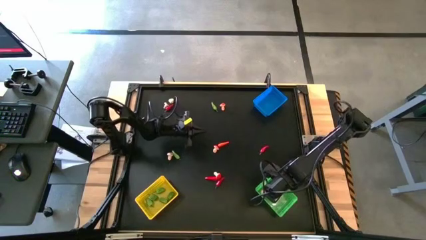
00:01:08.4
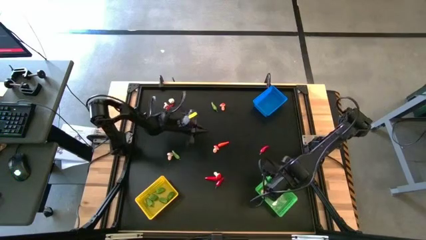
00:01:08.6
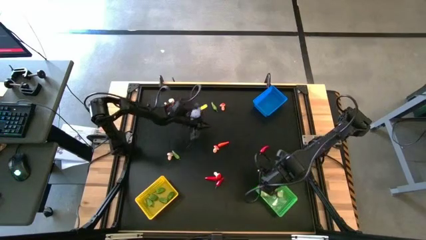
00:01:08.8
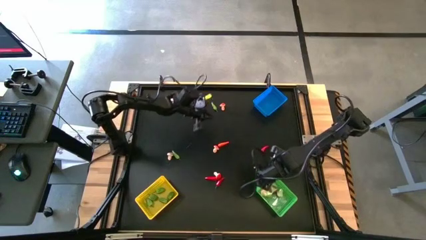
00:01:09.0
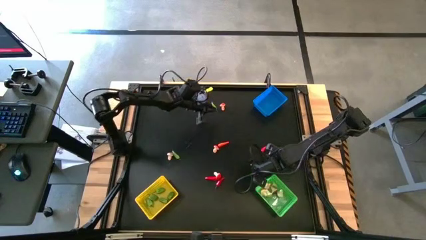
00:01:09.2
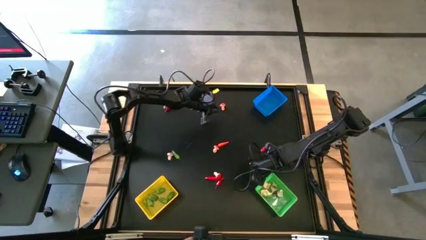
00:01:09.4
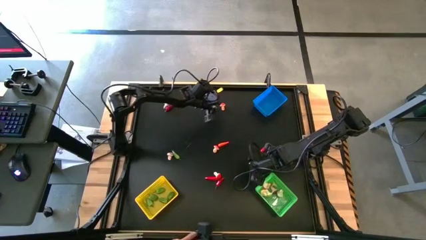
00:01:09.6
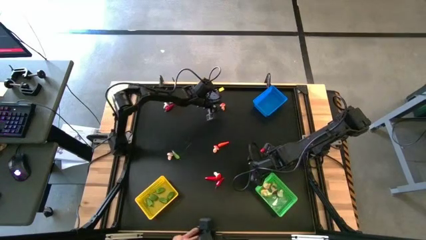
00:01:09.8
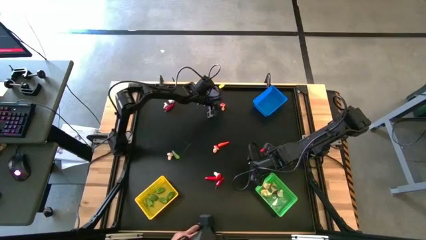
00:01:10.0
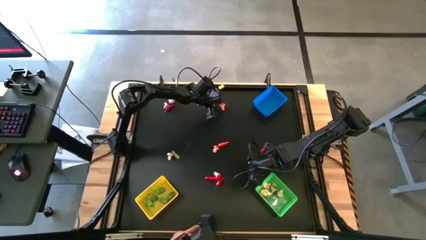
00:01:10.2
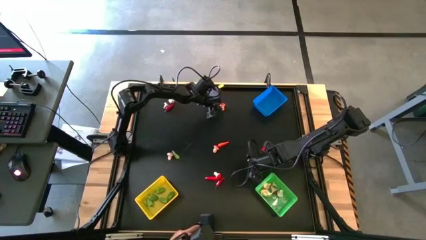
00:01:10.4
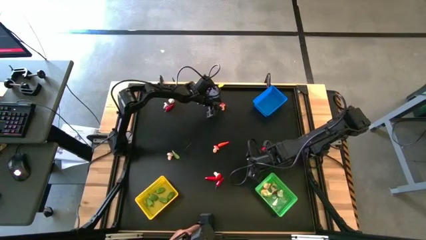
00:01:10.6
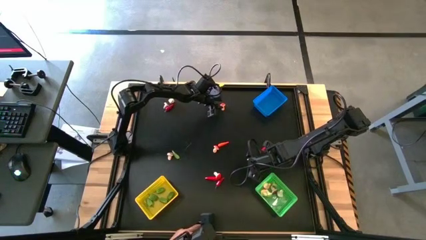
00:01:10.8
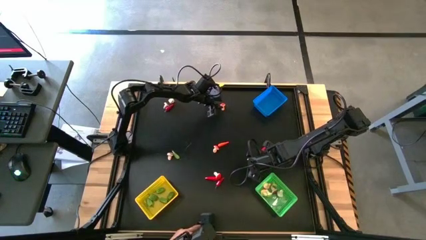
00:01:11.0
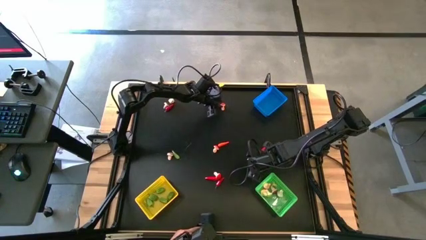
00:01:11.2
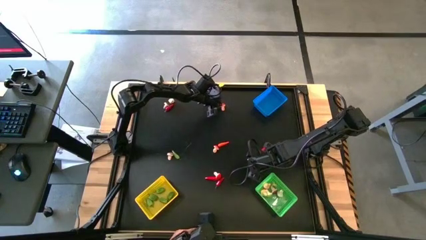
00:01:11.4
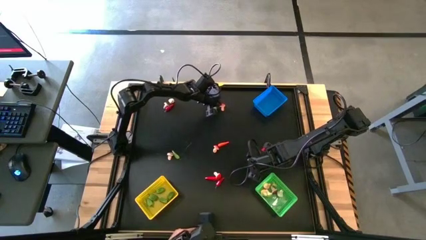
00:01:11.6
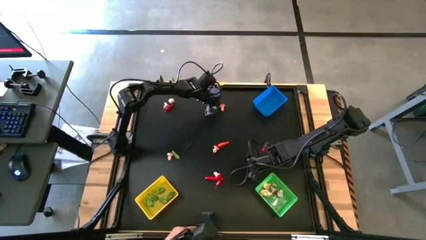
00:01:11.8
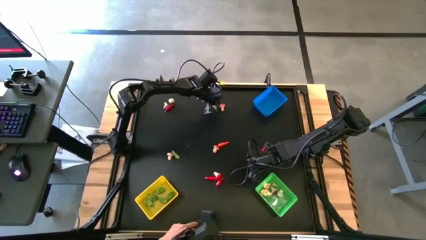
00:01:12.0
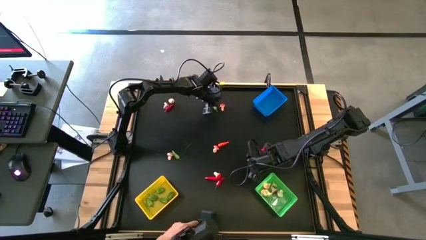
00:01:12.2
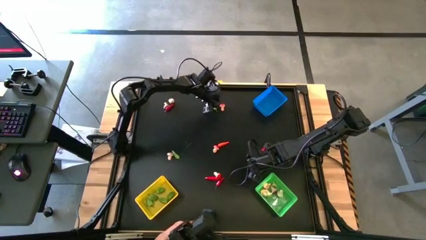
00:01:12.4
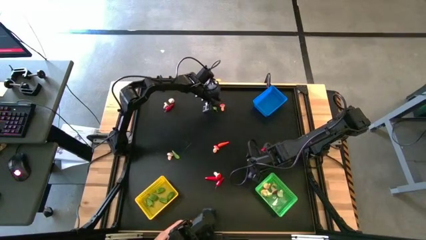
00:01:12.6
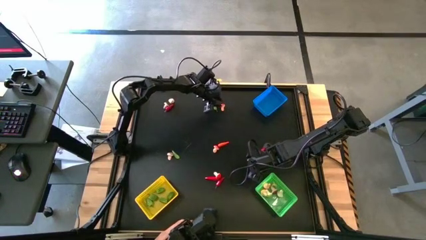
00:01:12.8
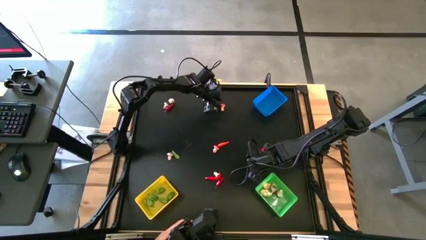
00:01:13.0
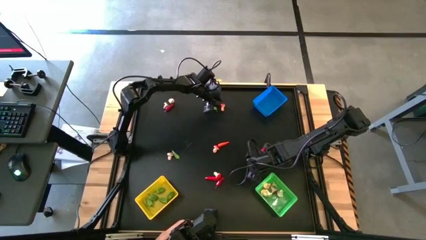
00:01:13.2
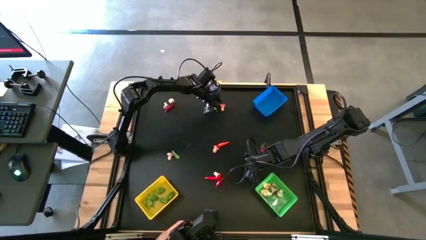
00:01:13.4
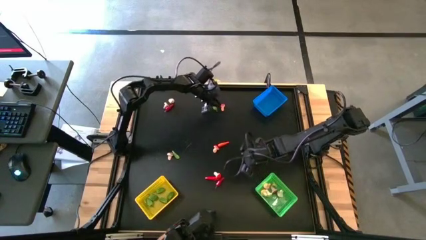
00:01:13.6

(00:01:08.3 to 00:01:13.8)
Task: Sort produce into baskets
Put the red mushroom into the green bin

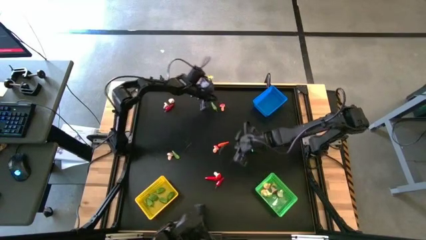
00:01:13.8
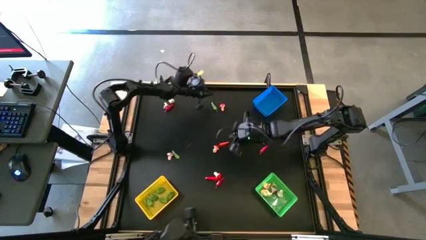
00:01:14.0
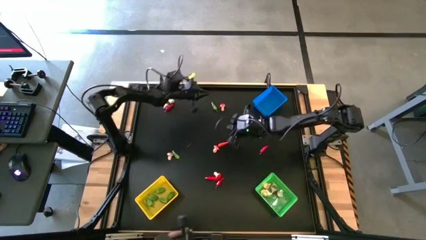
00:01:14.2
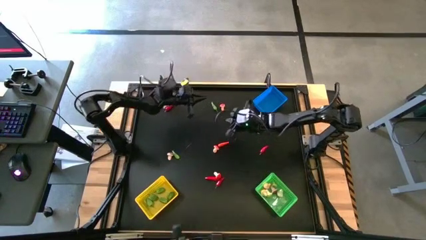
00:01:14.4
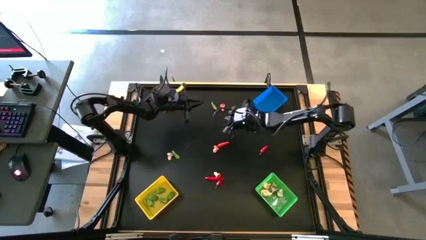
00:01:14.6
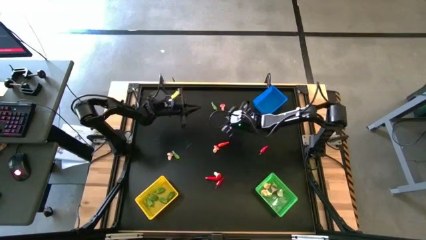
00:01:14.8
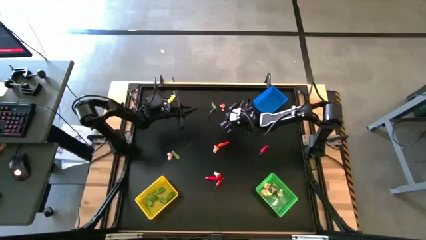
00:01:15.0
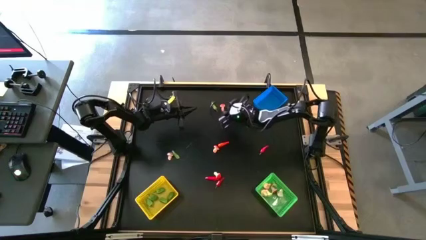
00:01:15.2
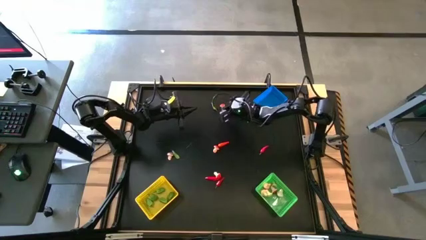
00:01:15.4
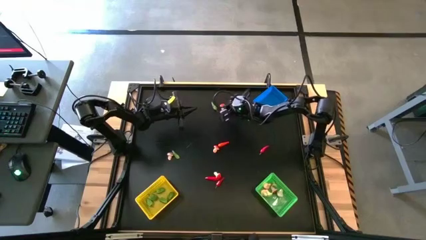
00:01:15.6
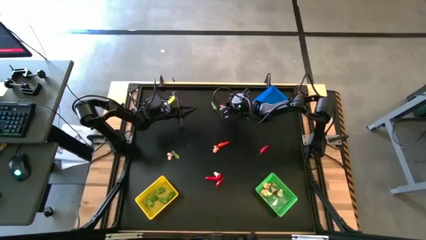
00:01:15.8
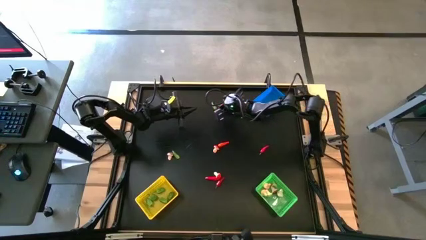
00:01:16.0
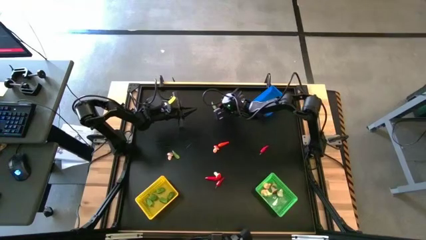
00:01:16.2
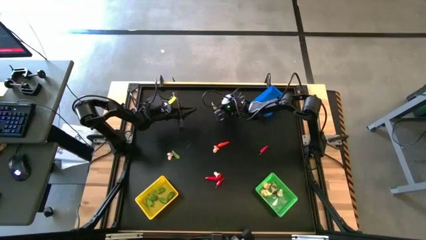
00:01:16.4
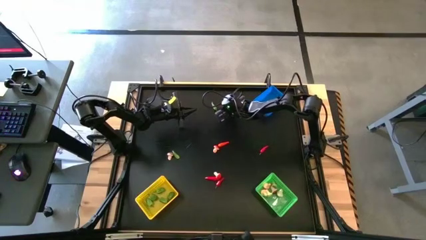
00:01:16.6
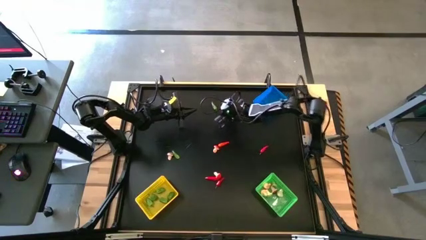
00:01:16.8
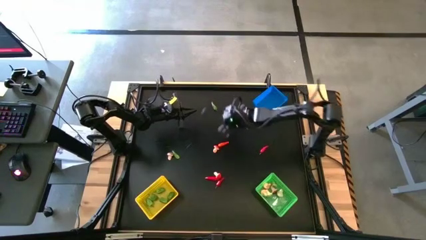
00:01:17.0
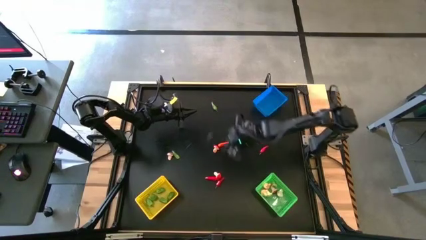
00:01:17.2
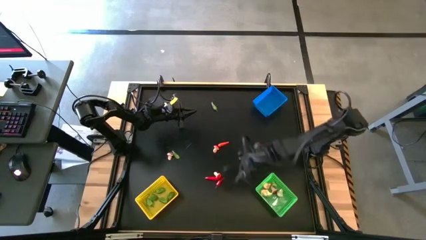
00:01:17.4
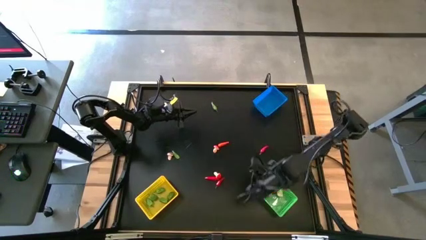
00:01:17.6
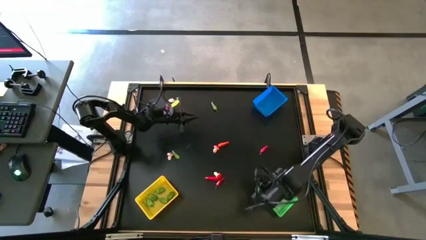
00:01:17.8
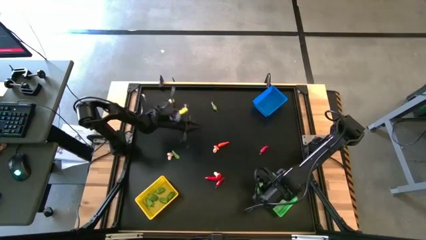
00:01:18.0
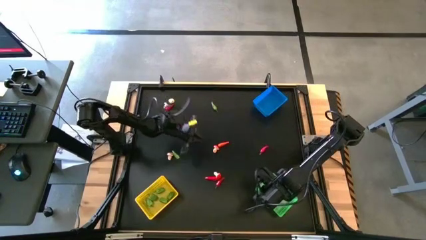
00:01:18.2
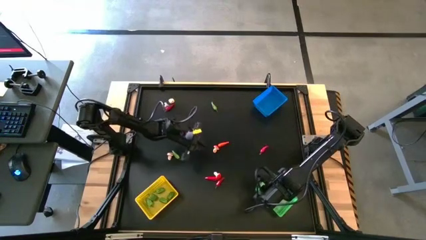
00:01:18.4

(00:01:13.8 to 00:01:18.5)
Put the red mushroom into the green bin

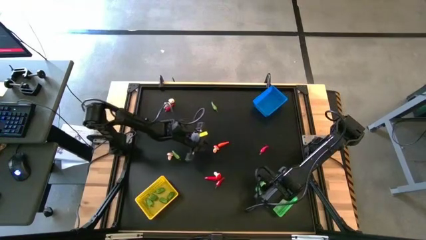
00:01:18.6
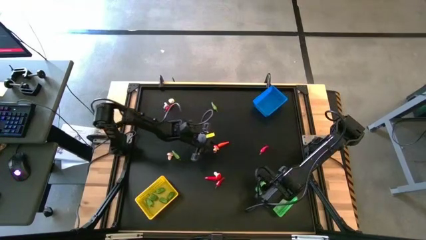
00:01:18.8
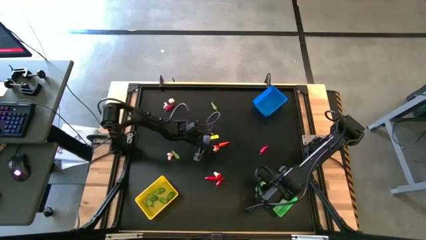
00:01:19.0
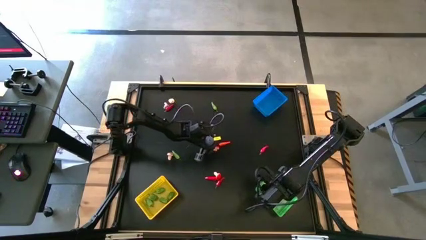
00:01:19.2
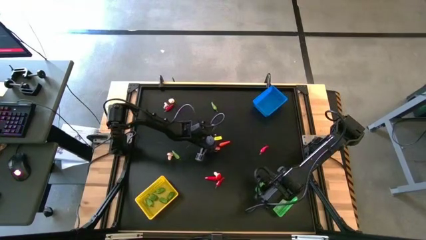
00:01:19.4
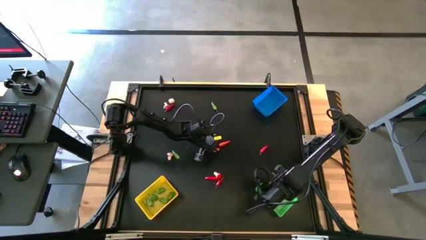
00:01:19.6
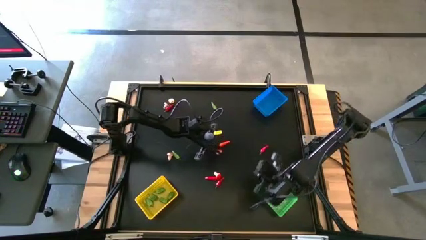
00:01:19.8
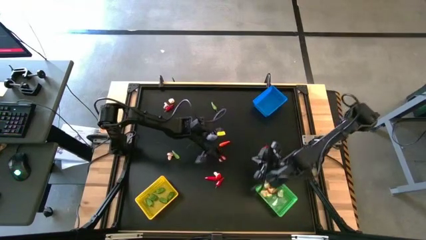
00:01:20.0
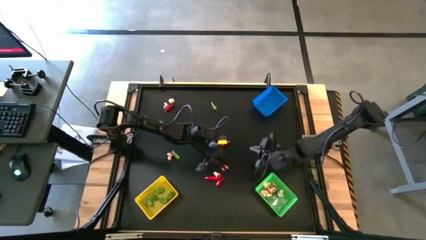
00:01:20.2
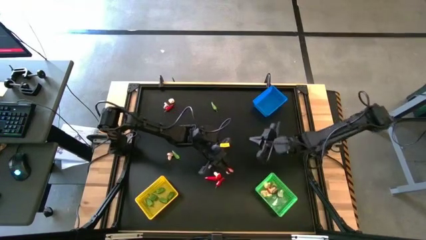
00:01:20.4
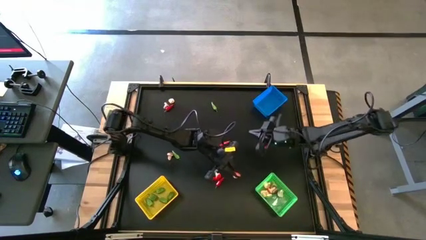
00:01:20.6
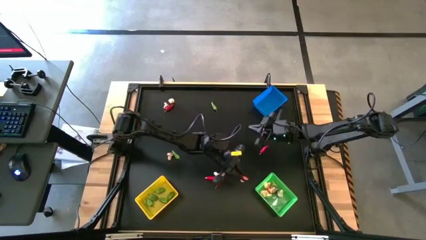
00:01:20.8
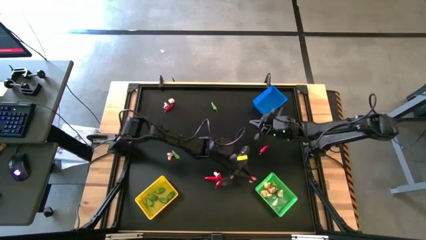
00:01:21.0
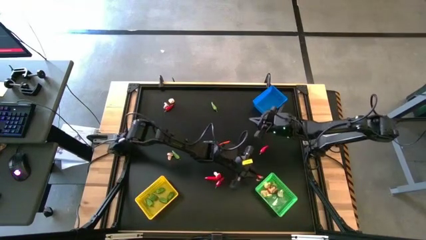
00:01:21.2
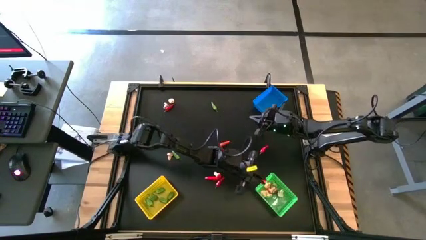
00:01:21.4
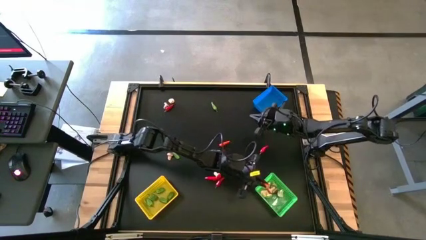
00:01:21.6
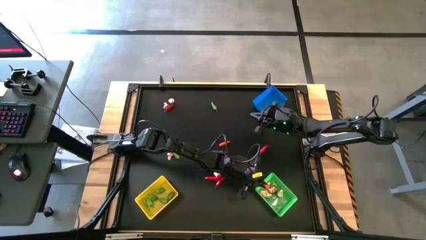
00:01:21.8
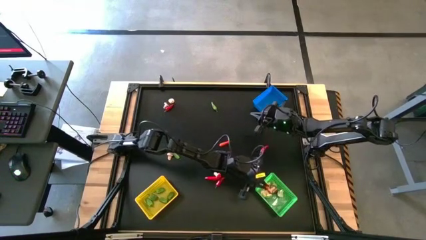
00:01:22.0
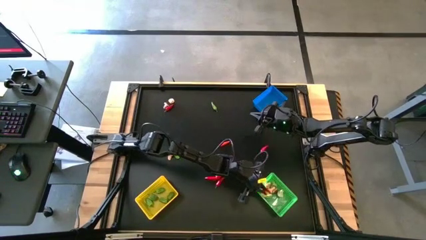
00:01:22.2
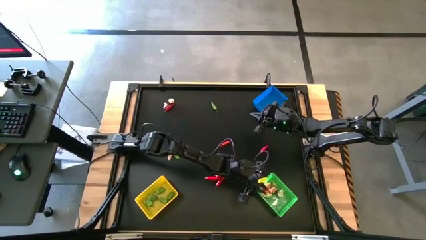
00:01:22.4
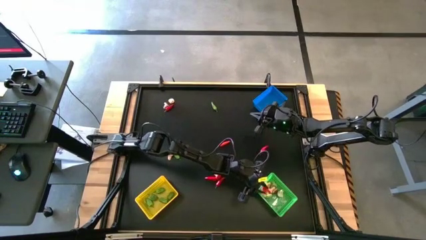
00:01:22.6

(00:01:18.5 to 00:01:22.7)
Put the red mushroom into the green bin

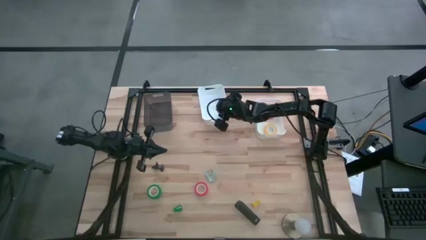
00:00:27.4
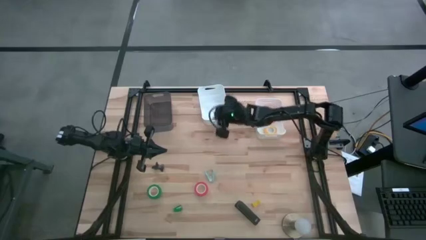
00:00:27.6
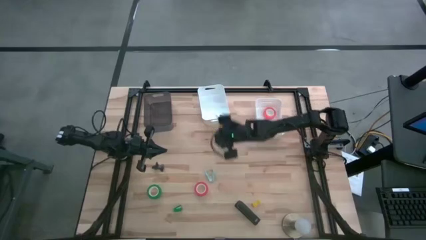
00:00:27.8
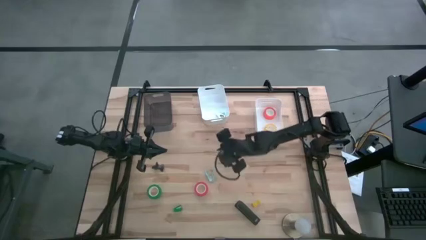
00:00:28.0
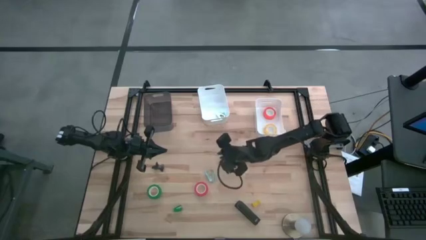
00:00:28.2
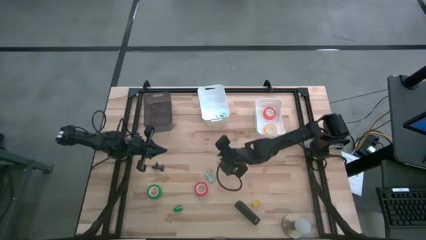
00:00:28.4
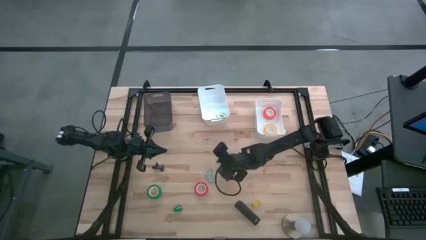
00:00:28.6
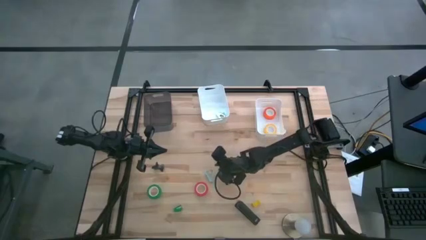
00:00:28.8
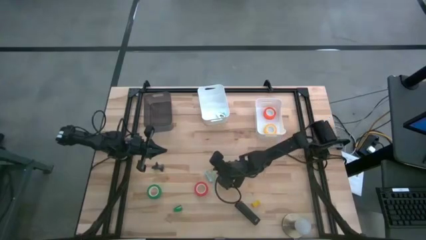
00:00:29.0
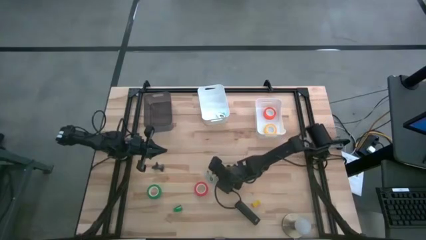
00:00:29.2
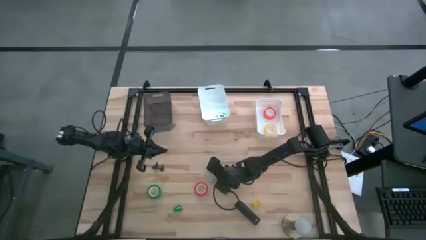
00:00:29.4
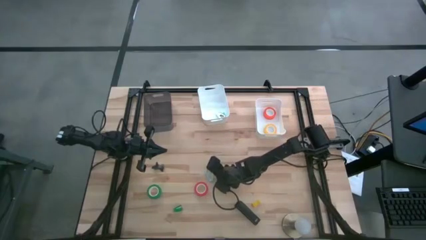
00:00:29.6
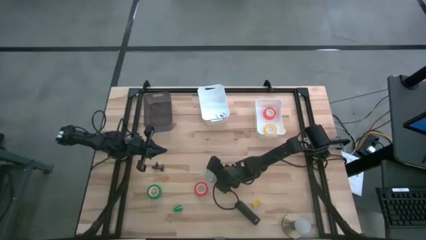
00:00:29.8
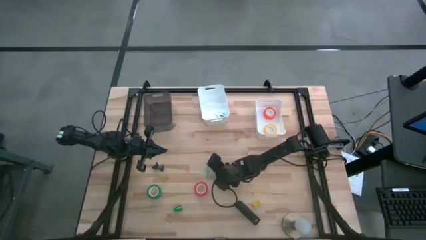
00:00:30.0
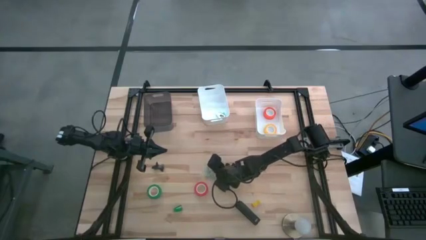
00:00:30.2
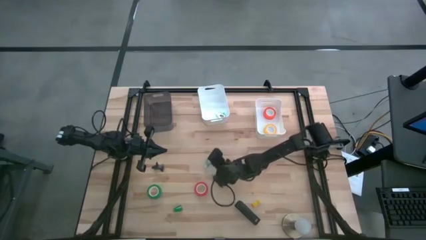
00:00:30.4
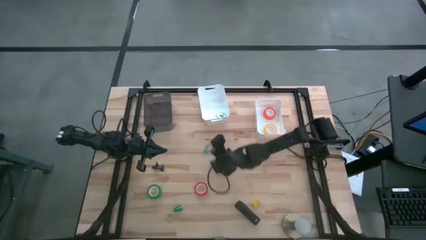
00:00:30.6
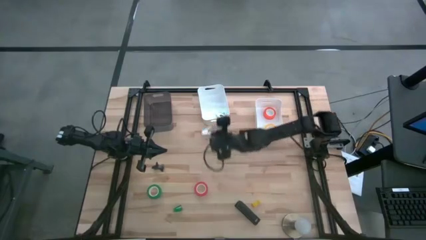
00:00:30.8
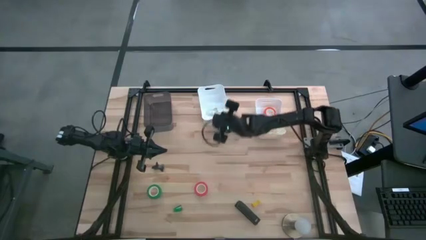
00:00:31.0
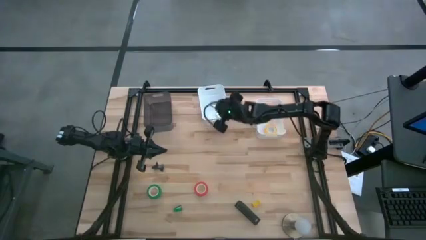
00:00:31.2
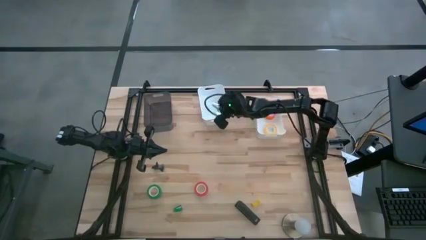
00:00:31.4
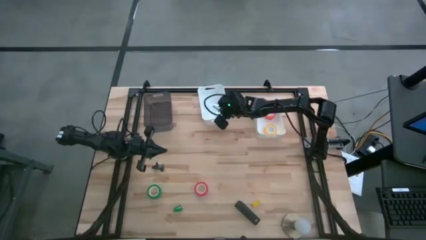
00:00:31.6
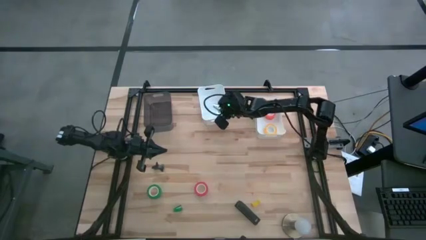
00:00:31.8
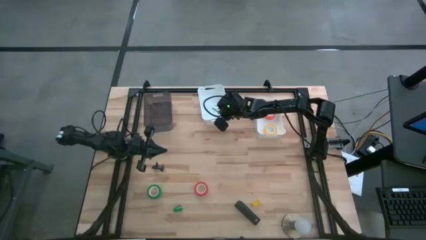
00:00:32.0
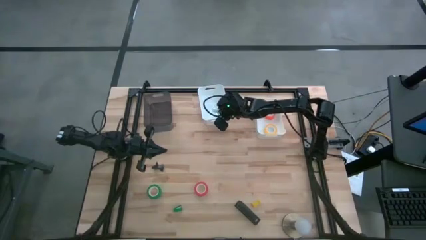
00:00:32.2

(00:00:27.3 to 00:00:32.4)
Task: Pick and place Stapler, Stapler remover, tape
Put the light blue staple remover into the left white bin
